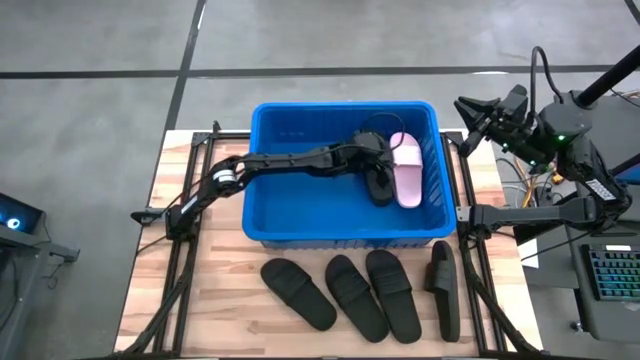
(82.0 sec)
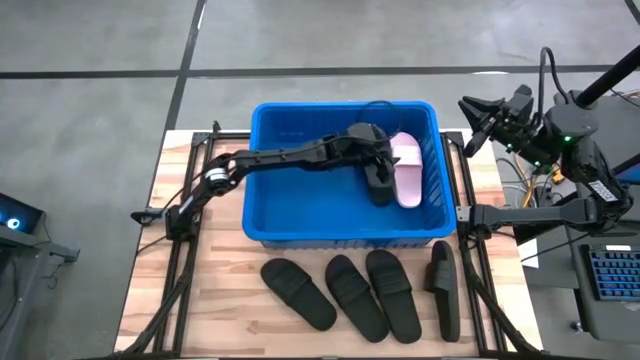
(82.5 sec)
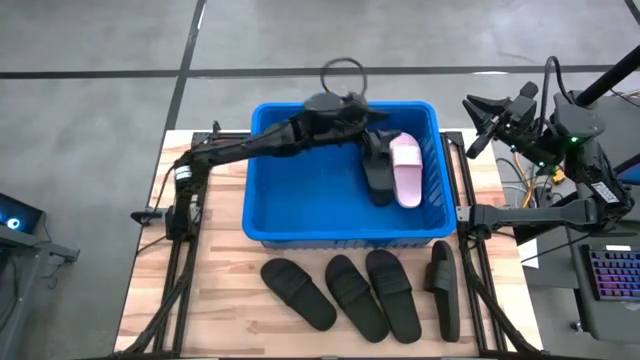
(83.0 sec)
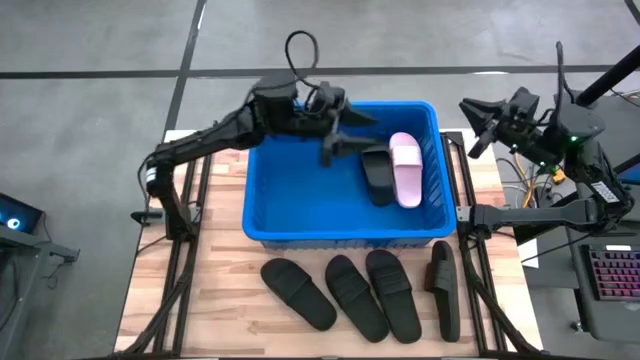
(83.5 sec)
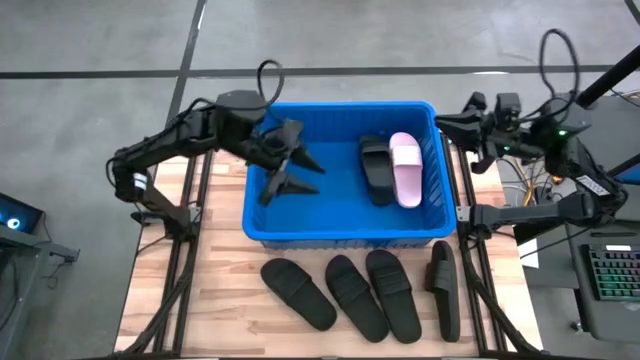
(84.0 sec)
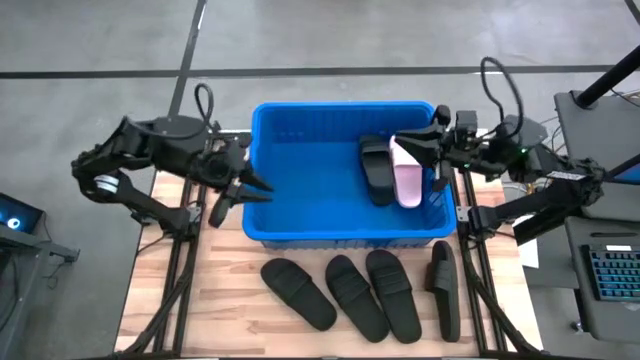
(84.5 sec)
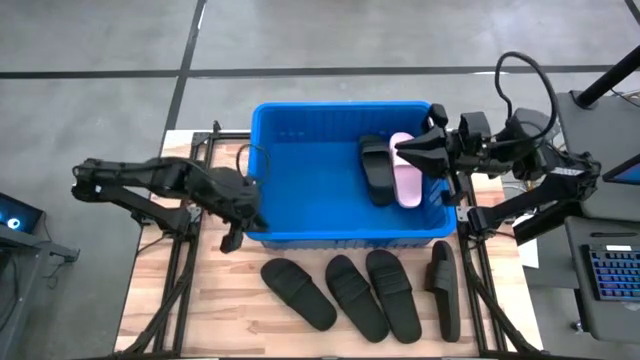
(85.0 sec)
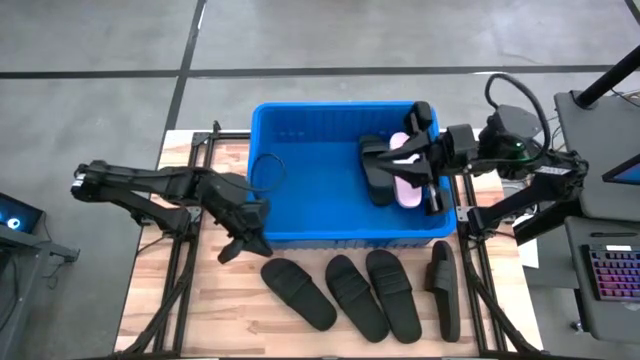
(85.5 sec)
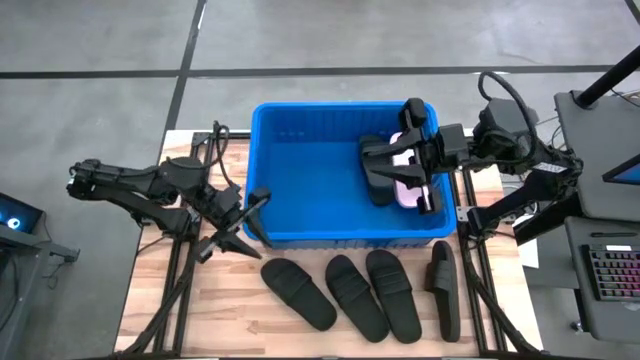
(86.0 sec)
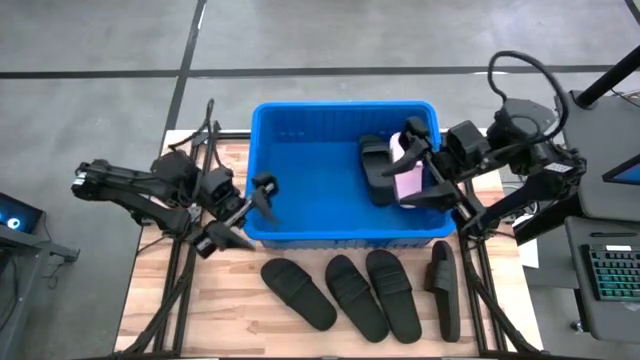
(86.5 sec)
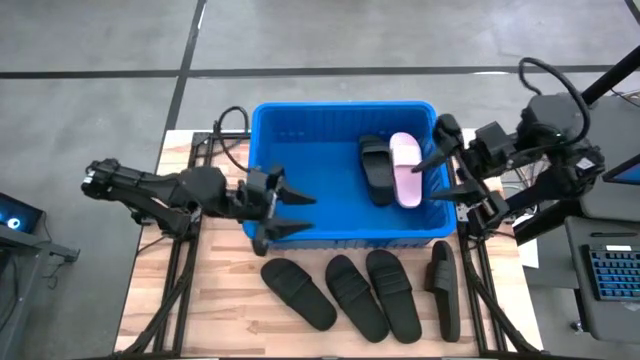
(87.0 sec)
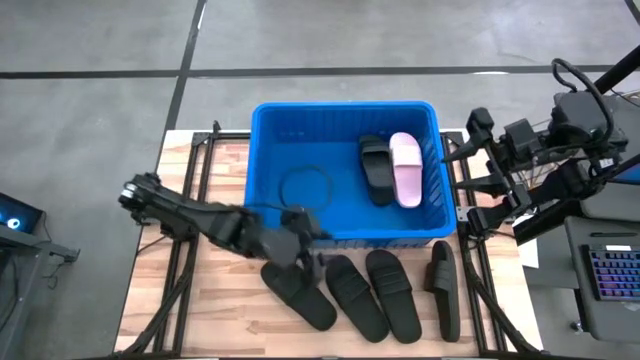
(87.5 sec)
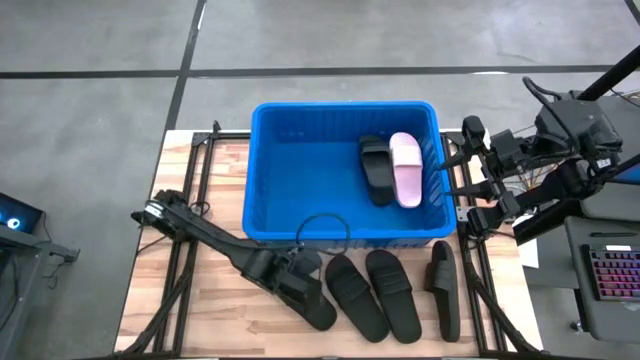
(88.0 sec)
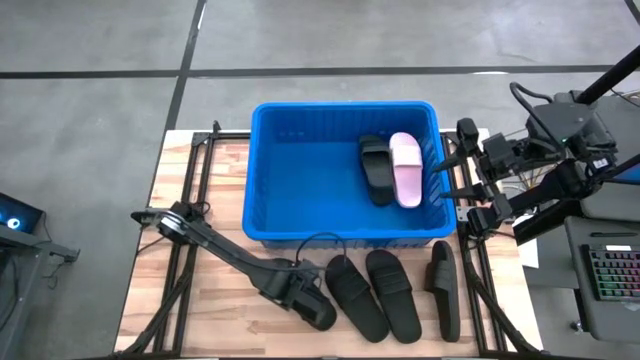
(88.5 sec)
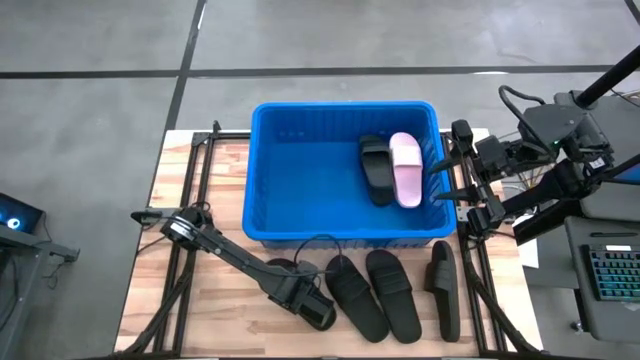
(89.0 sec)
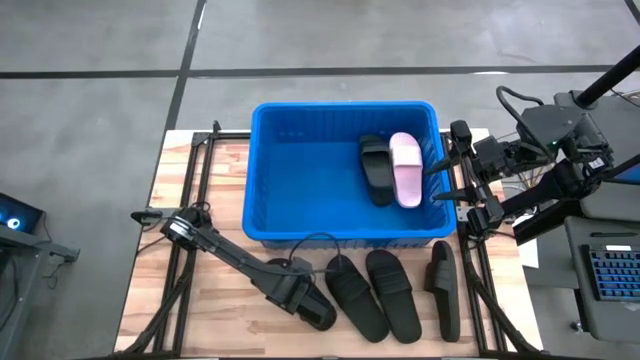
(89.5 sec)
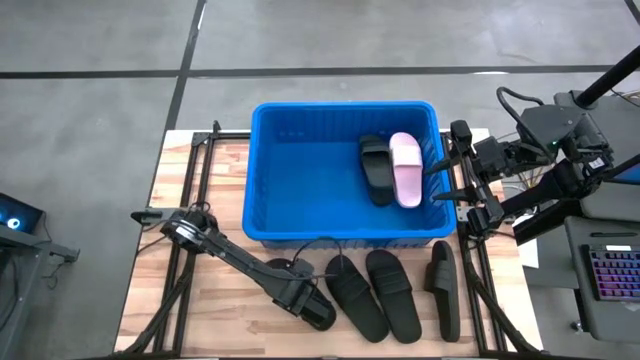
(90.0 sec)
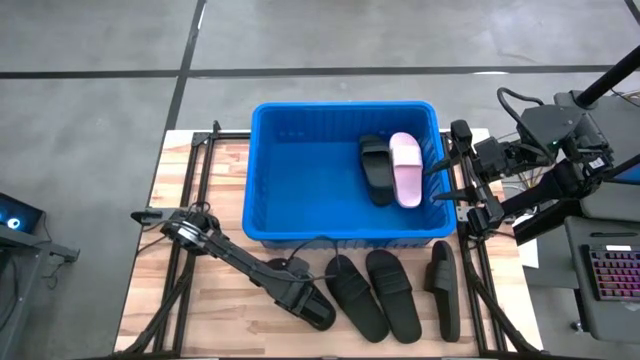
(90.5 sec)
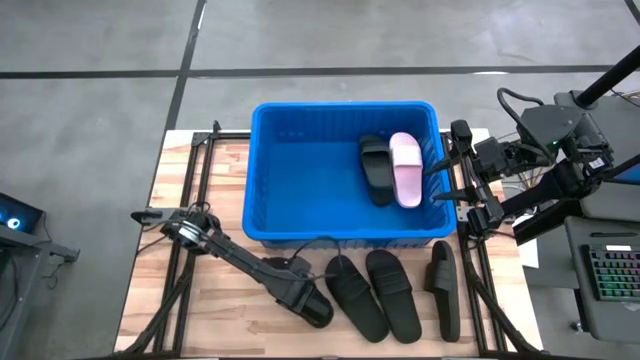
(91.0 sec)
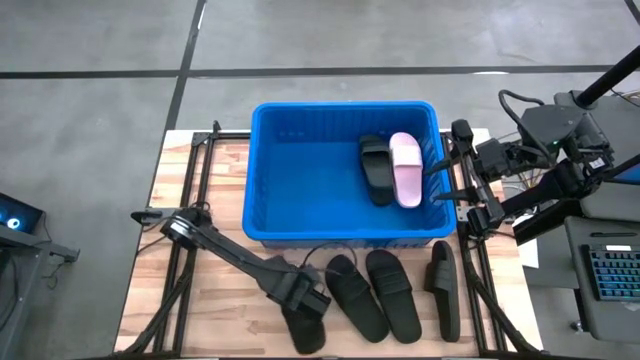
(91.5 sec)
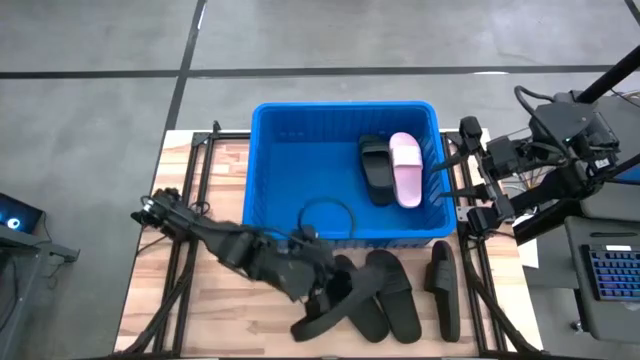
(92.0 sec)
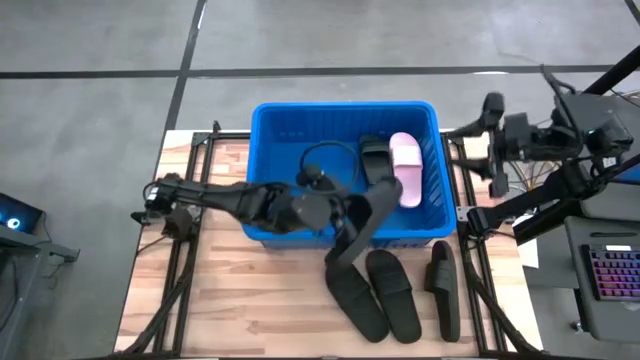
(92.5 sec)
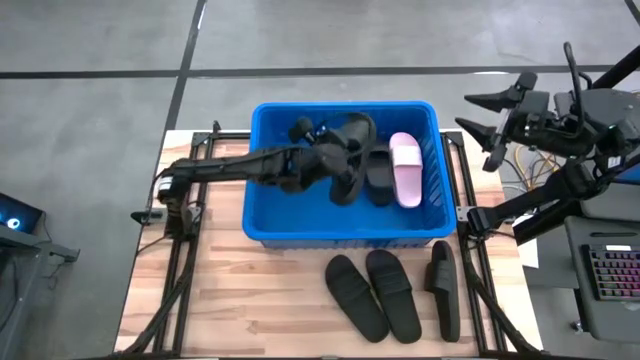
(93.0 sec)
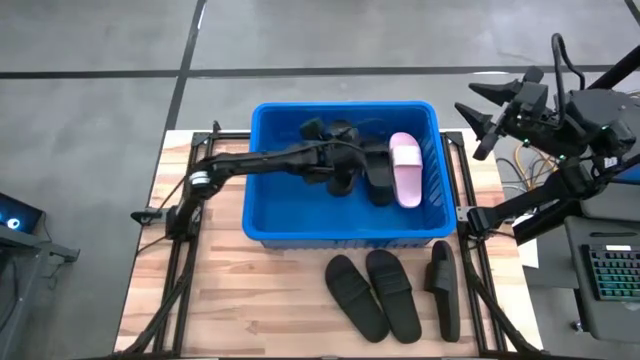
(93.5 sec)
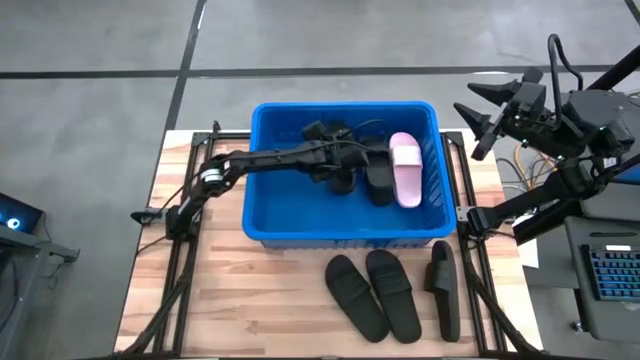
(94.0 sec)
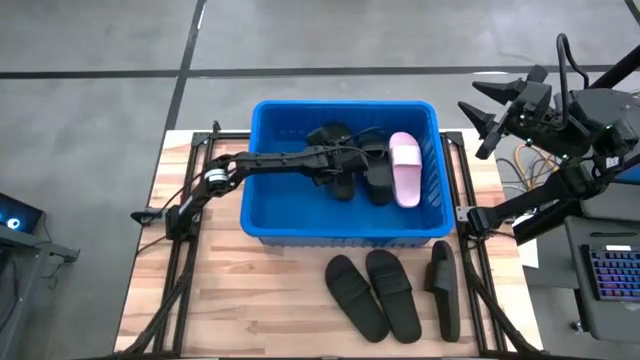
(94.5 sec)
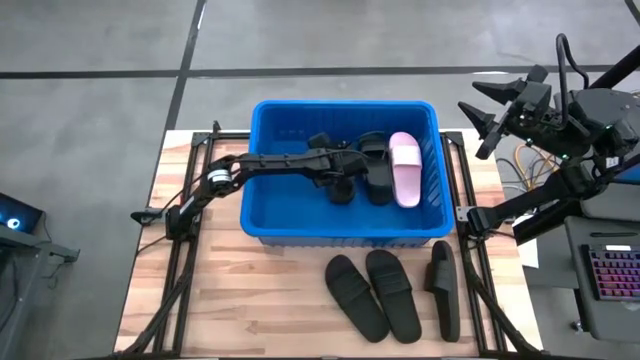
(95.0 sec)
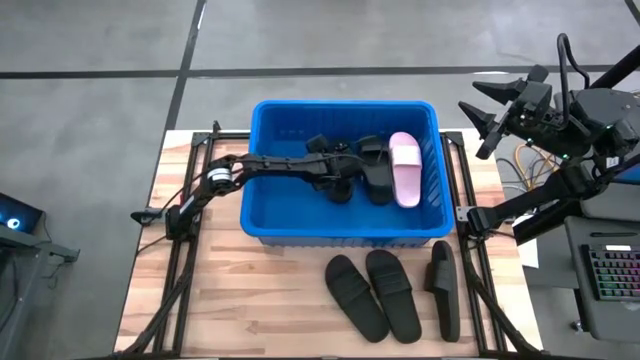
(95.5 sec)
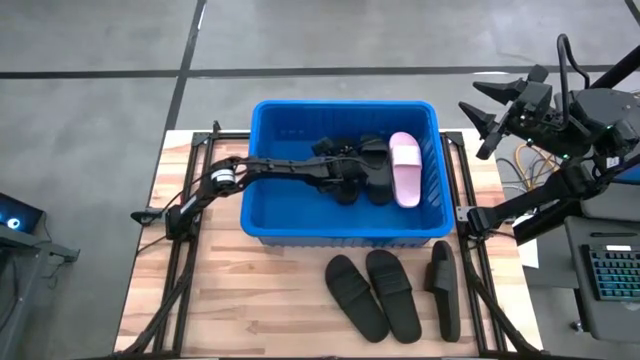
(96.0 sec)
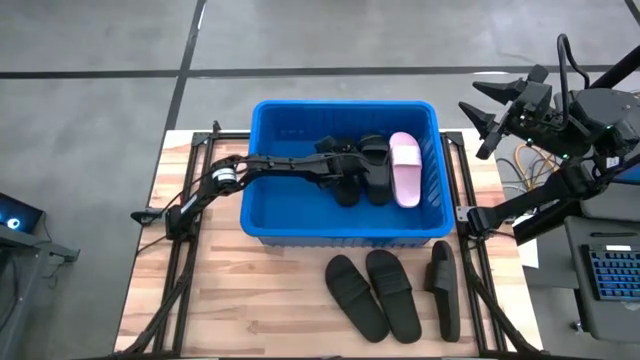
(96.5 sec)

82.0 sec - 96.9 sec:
Task: Pick and place slides into bin
Put the black slide into the blue bin

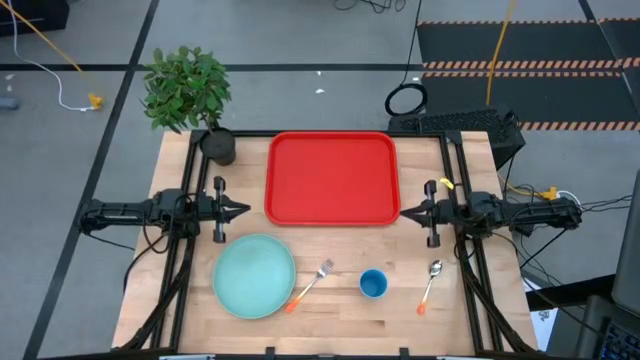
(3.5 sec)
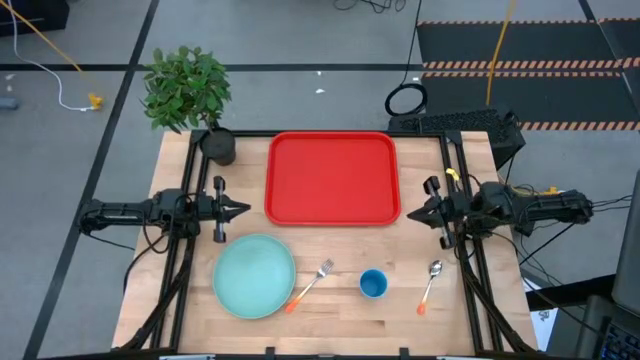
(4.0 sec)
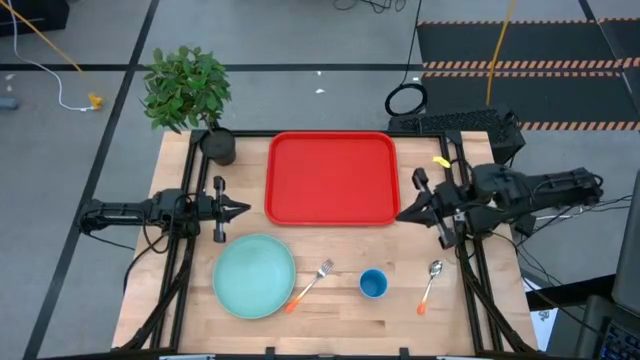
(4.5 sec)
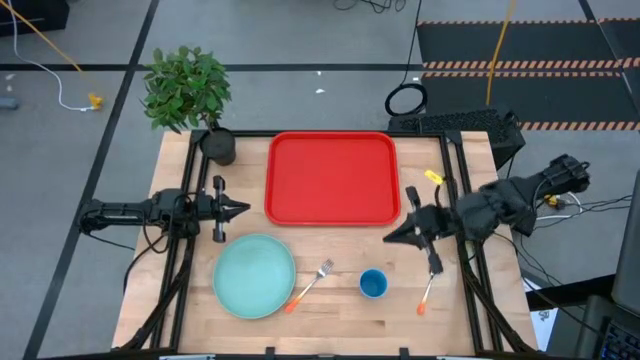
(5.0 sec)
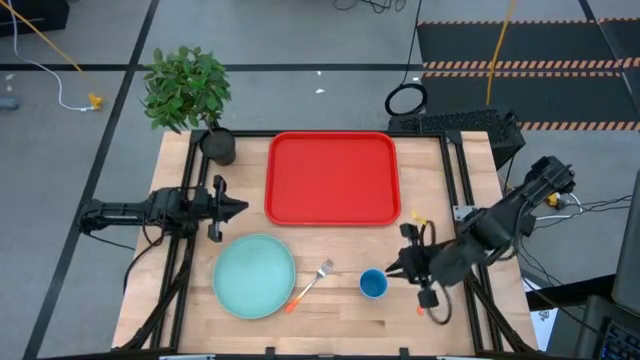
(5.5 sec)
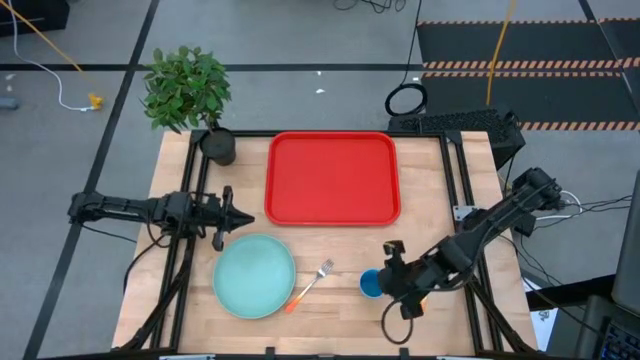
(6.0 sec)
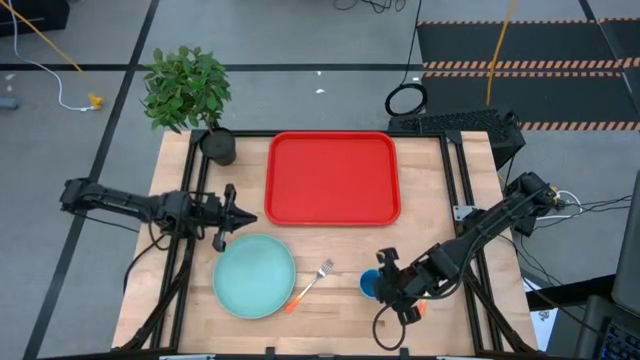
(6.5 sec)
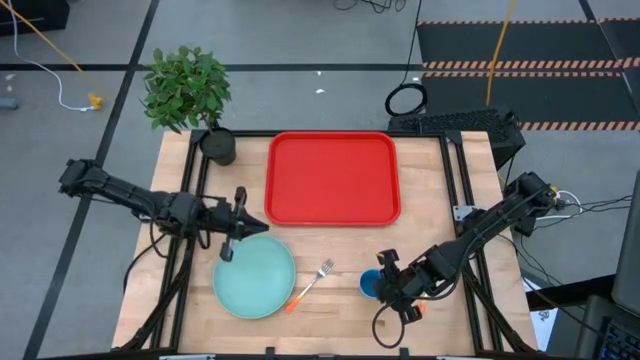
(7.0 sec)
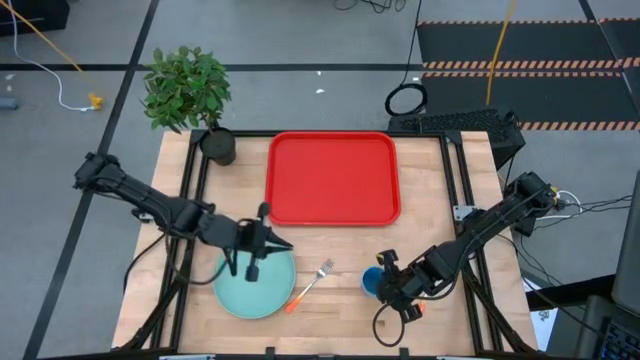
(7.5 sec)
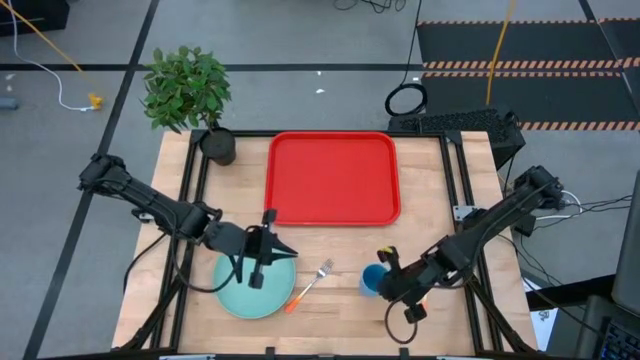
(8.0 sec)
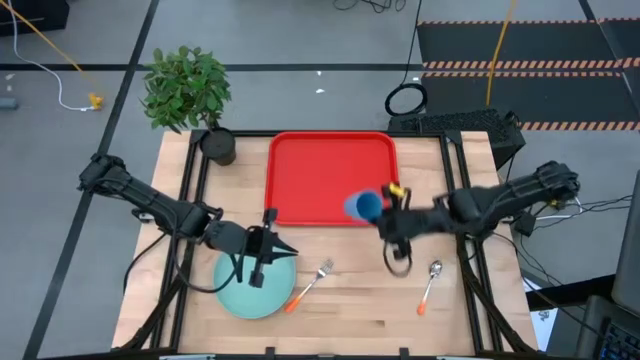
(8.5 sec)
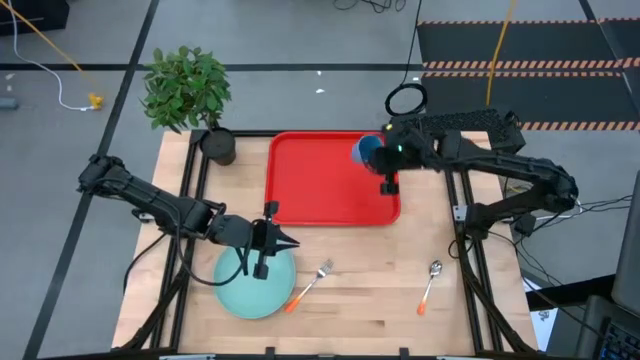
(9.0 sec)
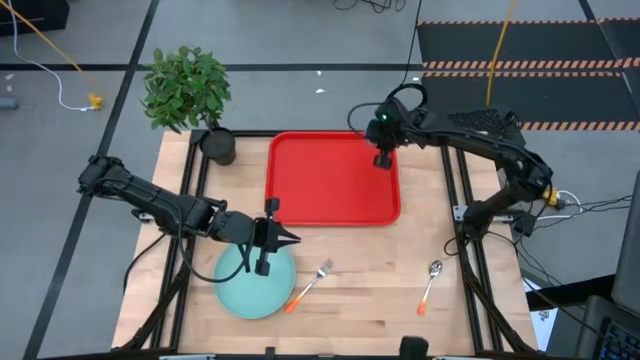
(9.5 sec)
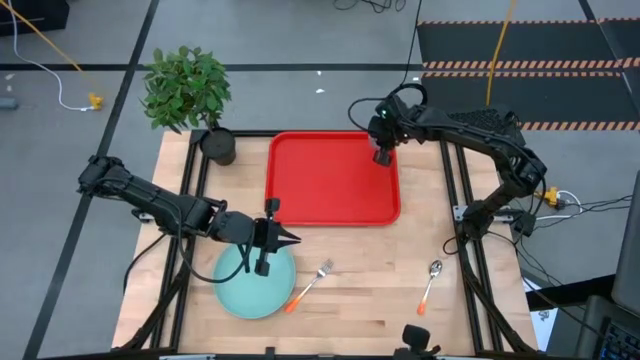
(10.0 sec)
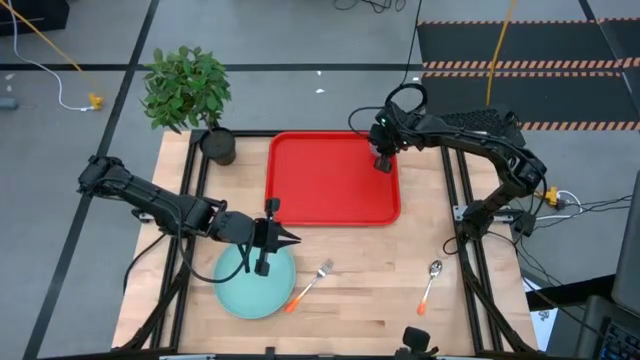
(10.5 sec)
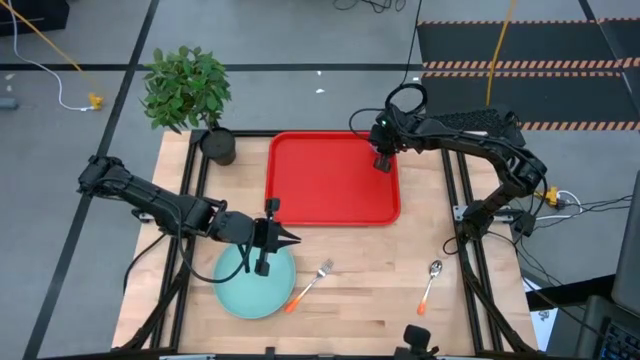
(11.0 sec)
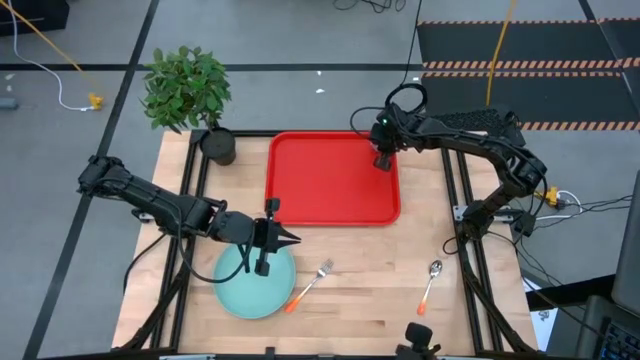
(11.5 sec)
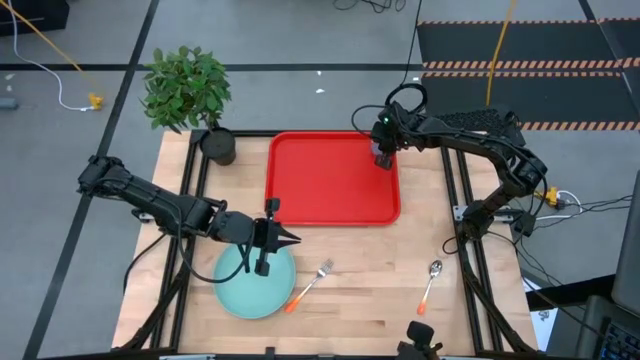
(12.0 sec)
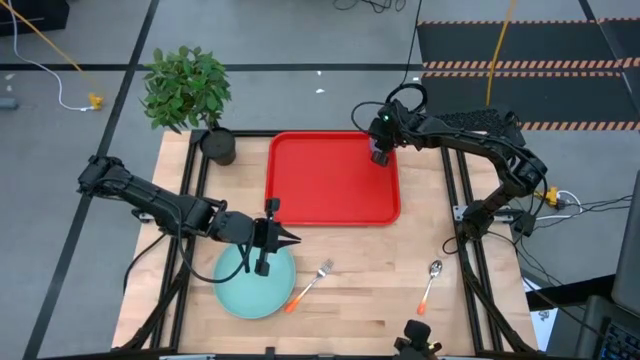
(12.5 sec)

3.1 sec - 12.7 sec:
Task: Pick and place plate/cup/fork/spoon on tray
Put the blue cup on the top right of the orange serving tray
